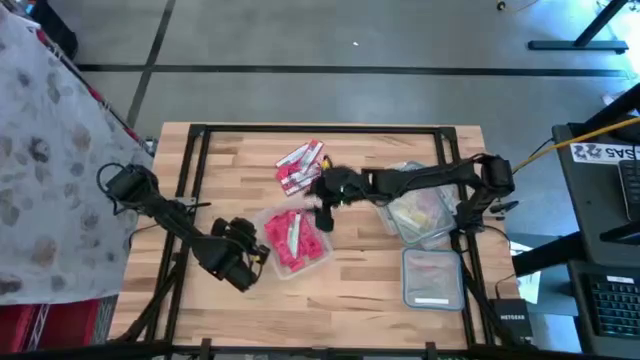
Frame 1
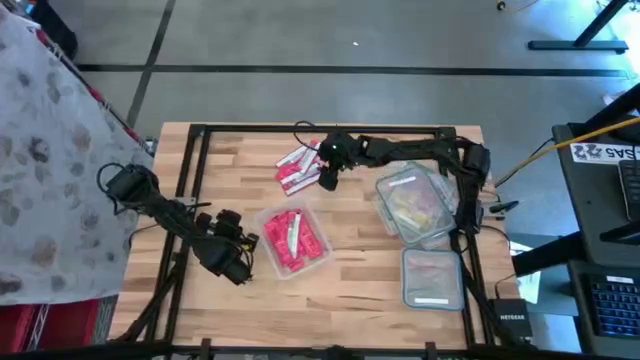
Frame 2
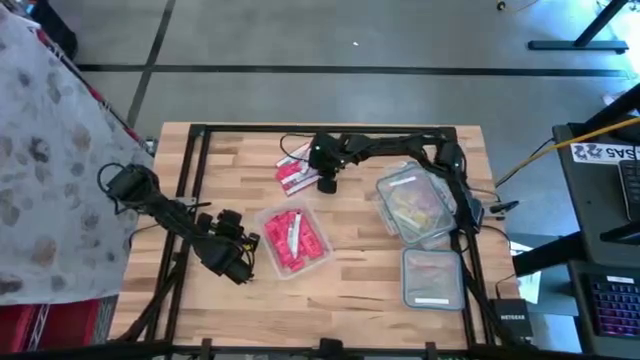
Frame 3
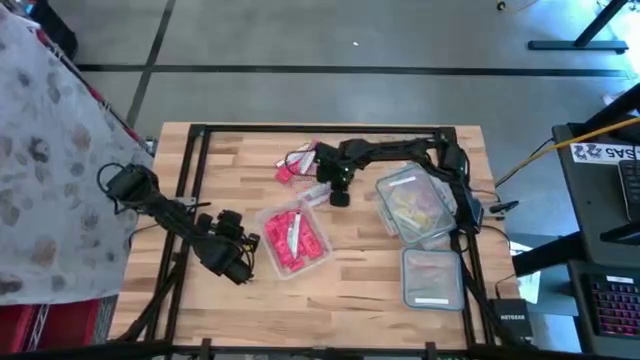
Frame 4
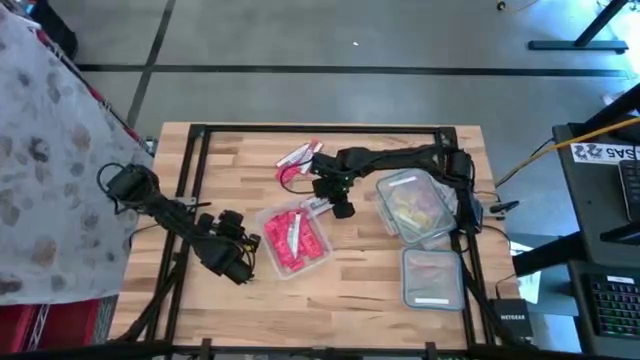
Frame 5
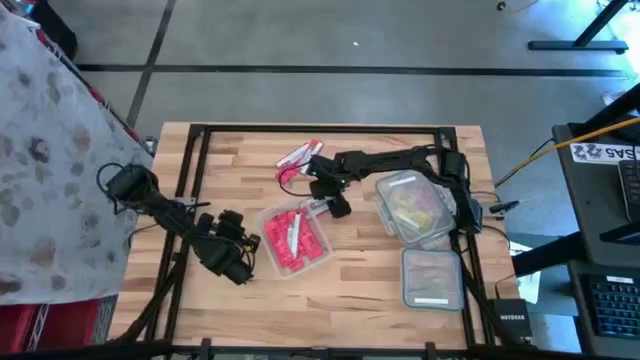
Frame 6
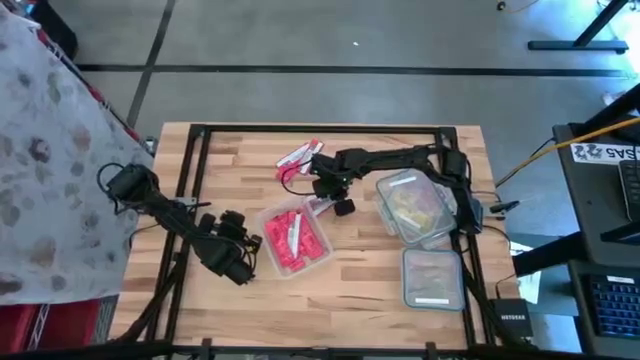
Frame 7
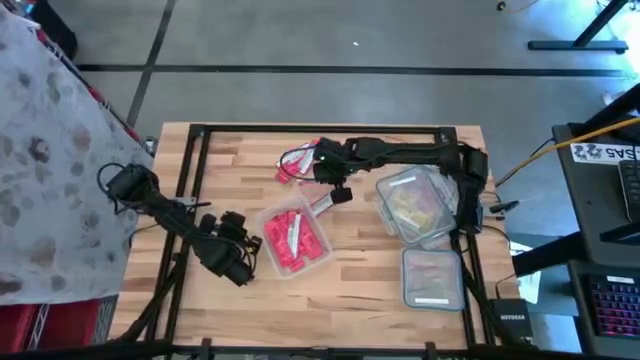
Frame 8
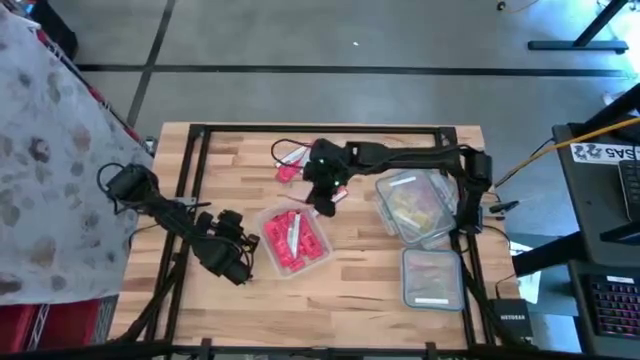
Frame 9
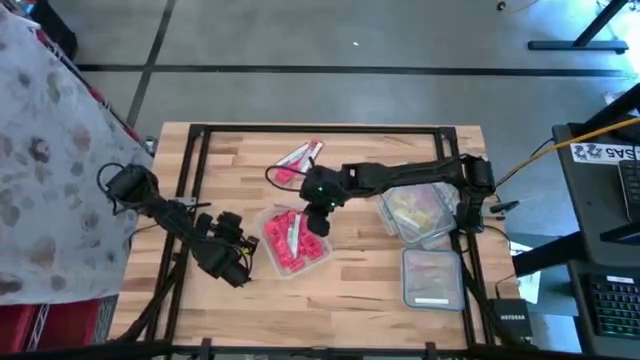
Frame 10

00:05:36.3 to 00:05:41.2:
Task: Sort candy
Put the pink candy strip into the left transparent bin

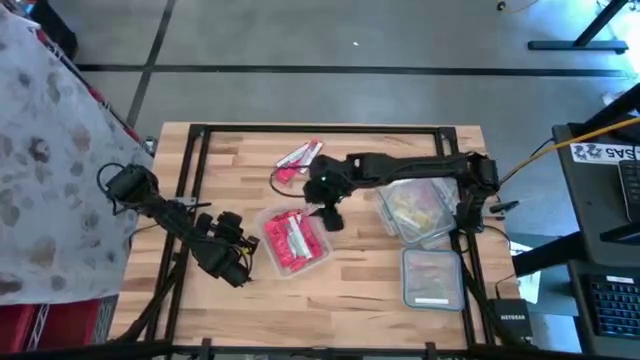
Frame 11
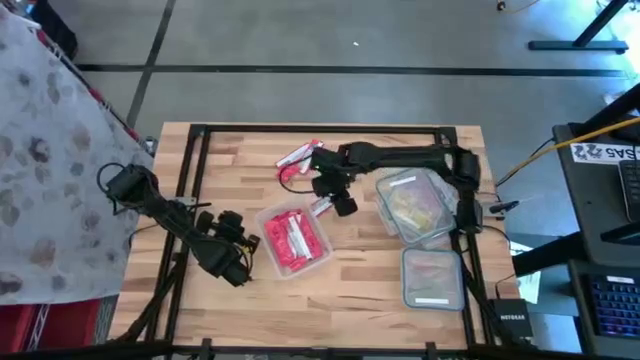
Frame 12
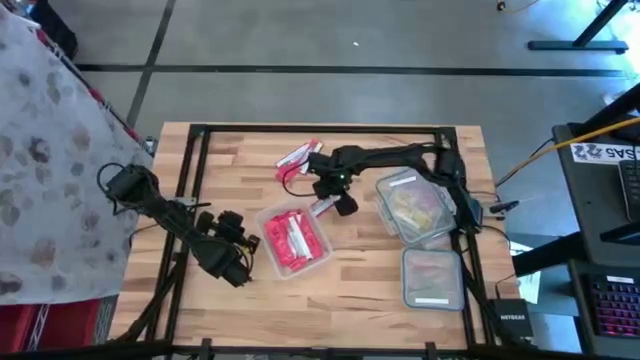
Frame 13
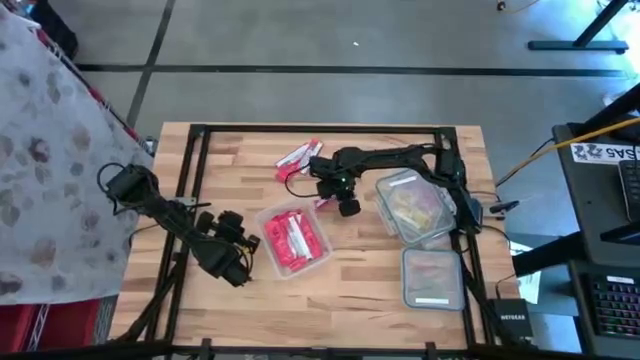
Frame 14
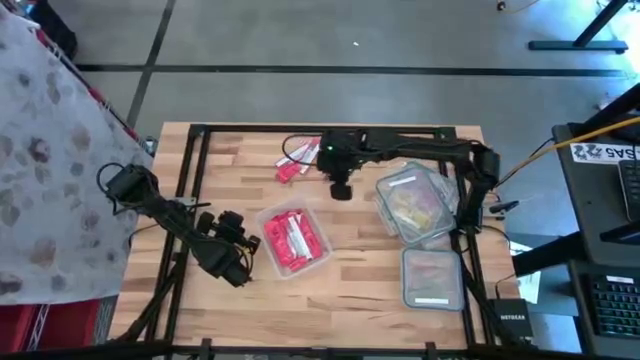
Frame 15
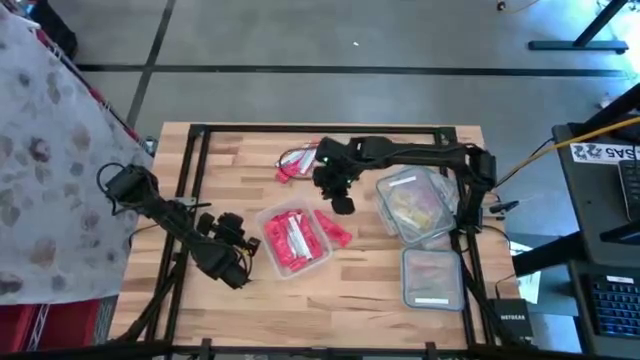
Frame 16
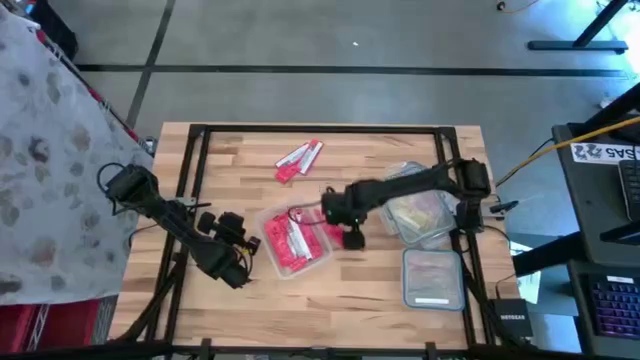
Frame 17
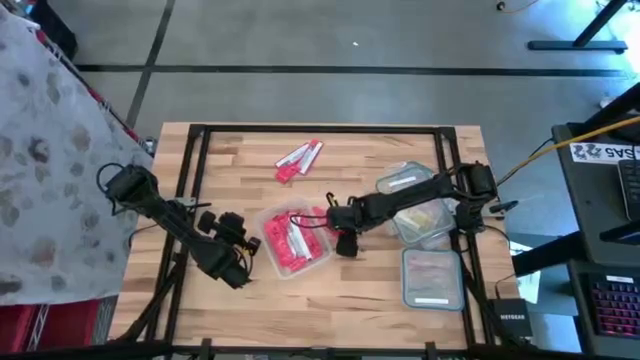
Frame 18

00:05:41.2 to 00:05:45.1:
Put the pink candy strip into the left transparent bin

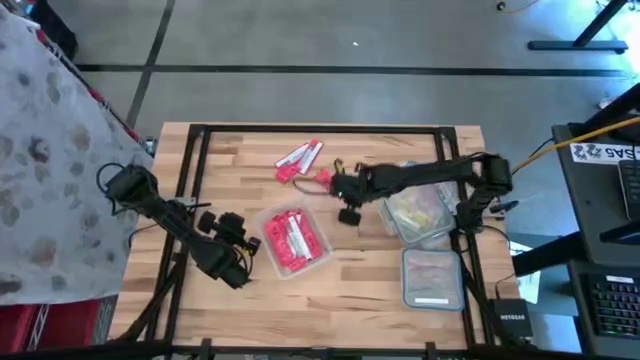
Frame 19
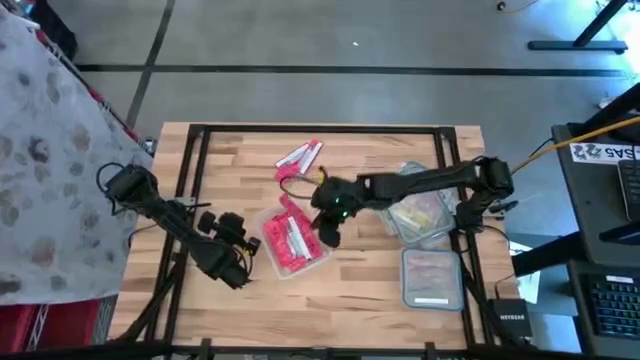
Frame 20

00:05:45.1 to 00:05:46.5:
Put the pink candy strip into the left transparent bin

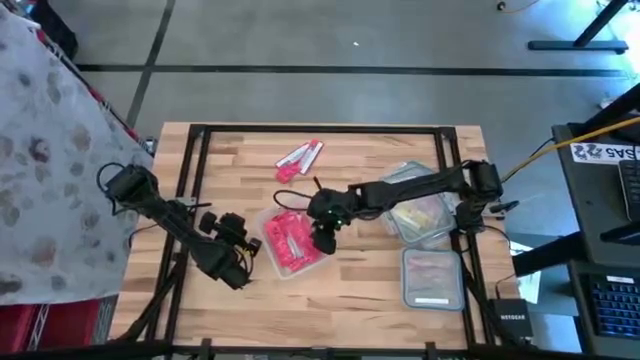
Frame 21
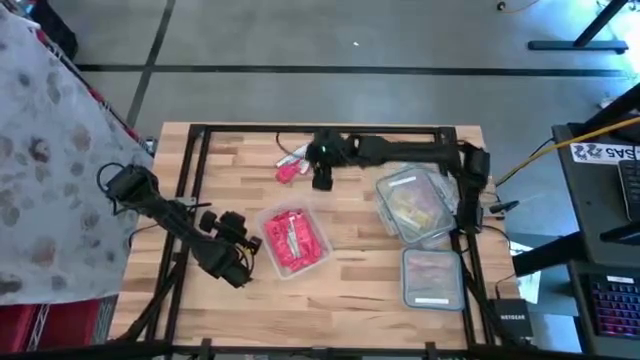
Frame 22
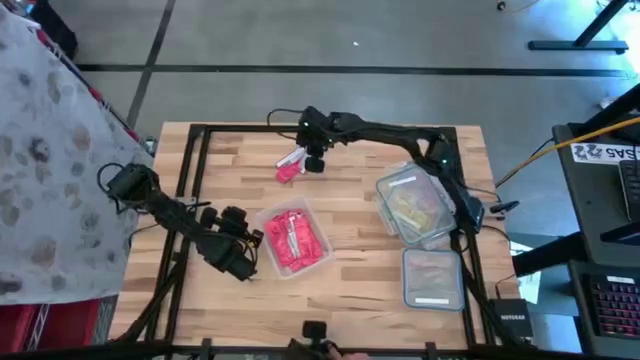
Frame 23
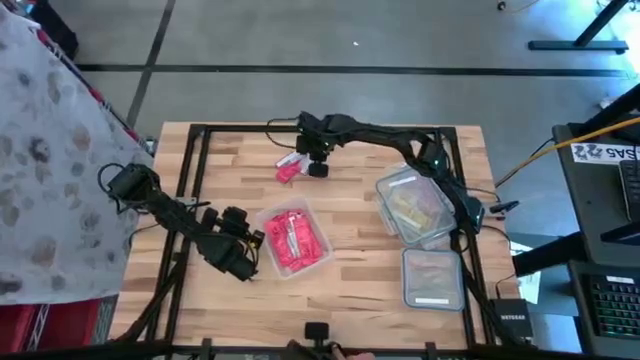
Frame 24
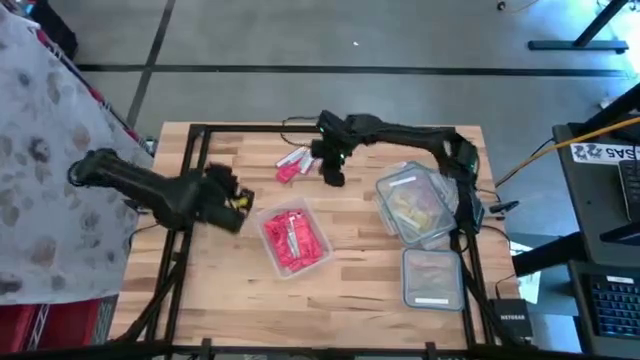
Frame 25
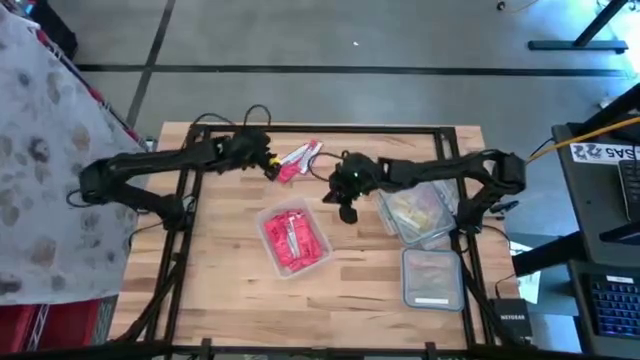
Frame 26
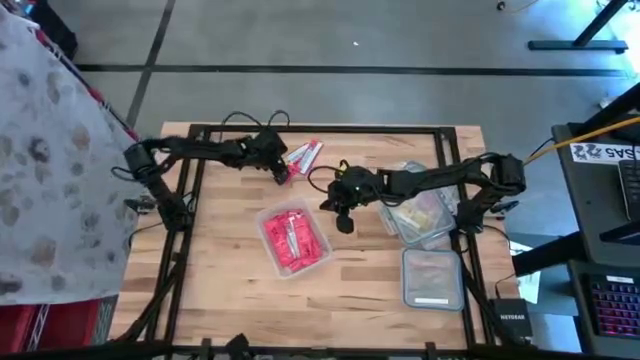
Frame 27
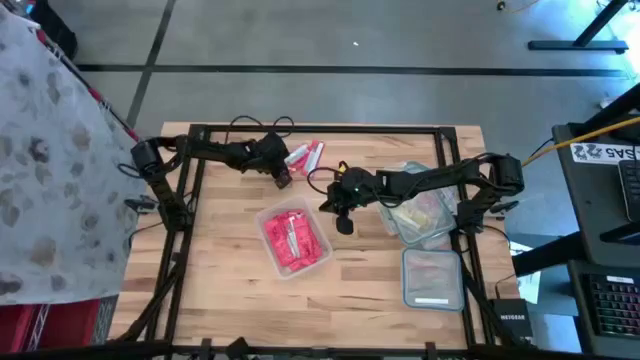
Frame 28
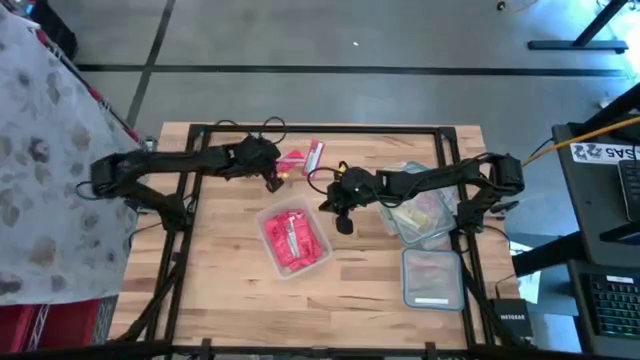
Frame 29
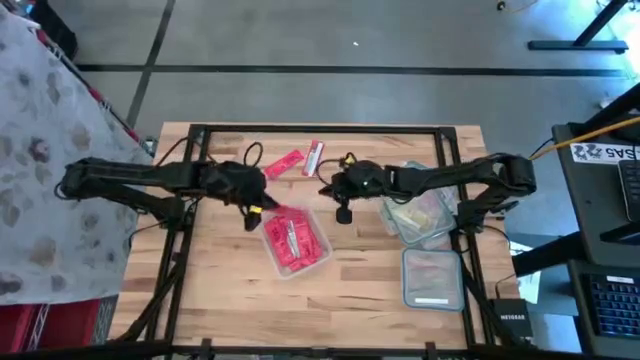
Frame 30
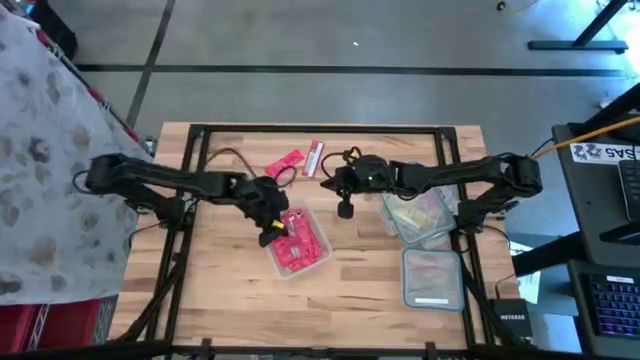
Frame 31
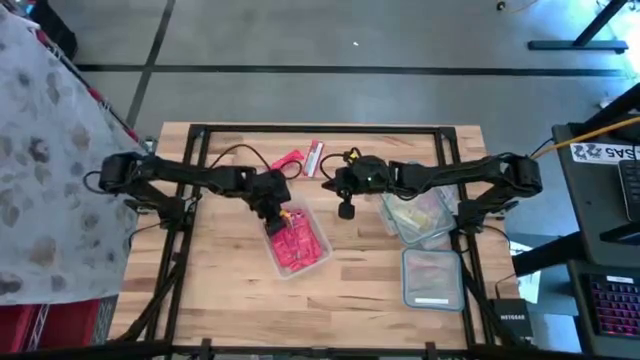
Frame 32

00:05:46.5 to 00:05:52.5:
Put the pink candy strip into the left transparent bin

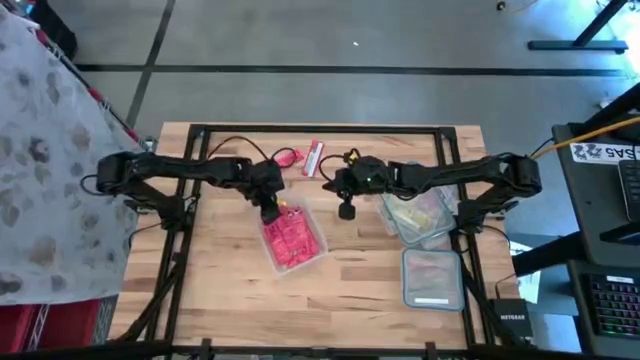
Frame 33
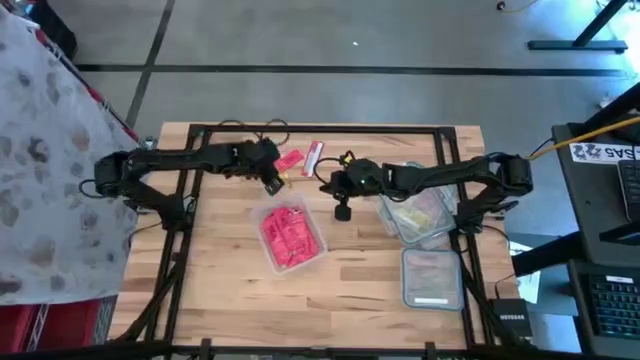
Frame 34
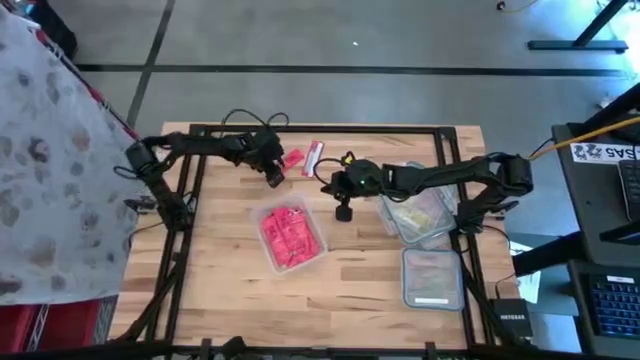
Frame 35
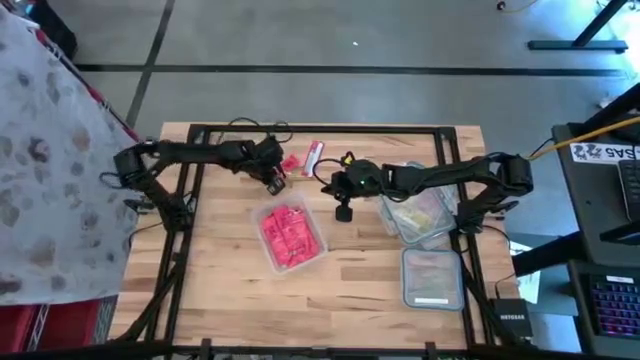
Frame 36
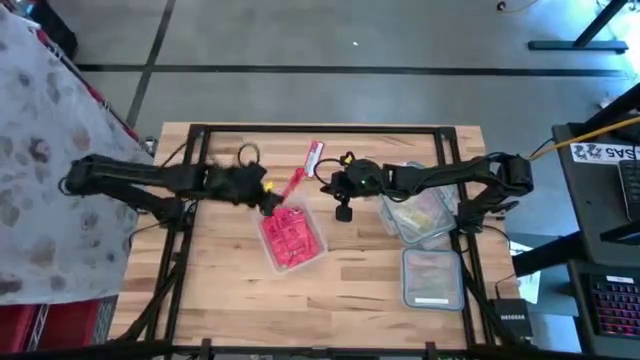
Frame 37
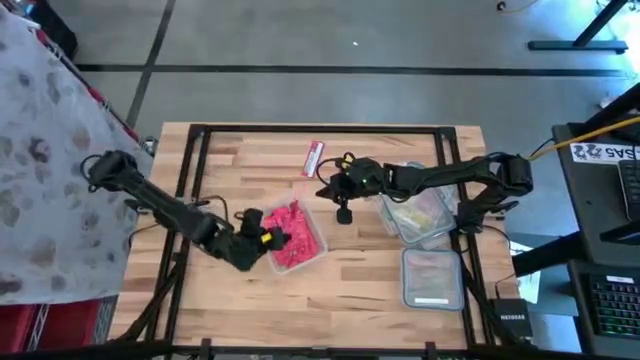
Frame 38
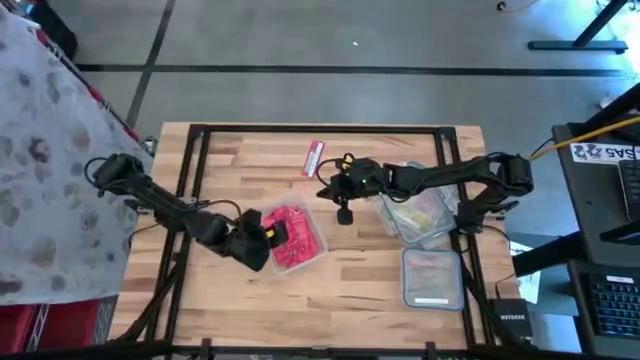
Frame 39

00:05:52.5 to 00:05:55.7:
Put the pink candy strip into the left transparent bin

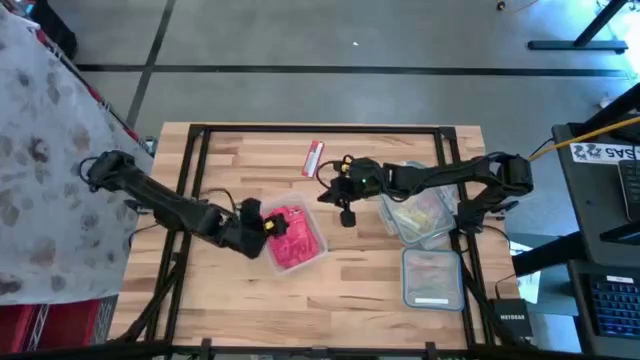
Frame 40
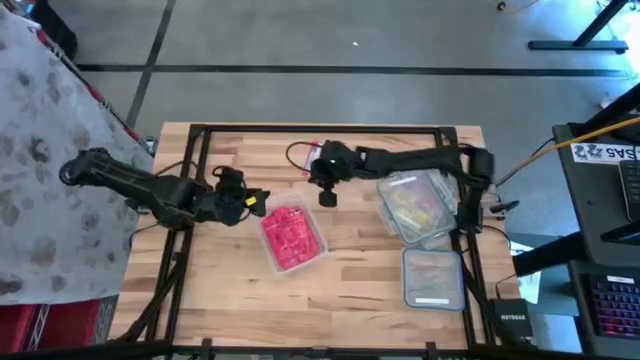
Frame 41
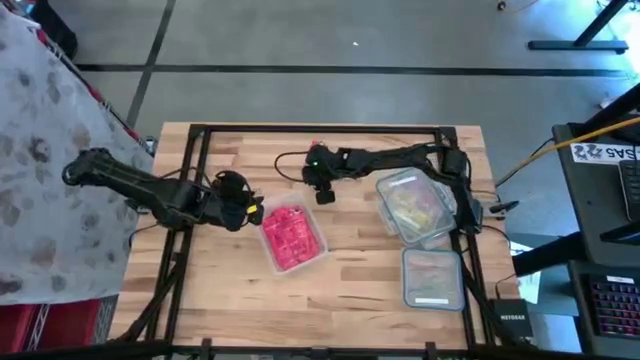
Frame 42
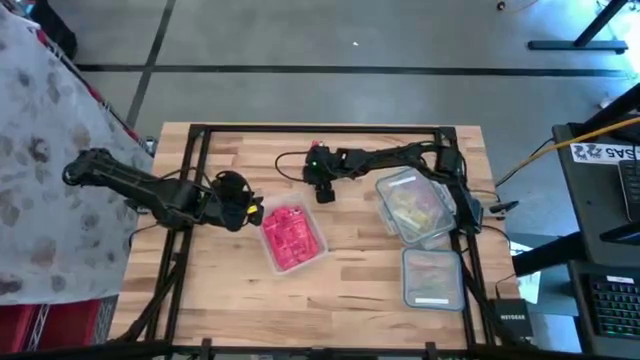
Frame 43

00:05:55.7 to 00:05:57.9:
Put the pink candy strip into the left transparent bin

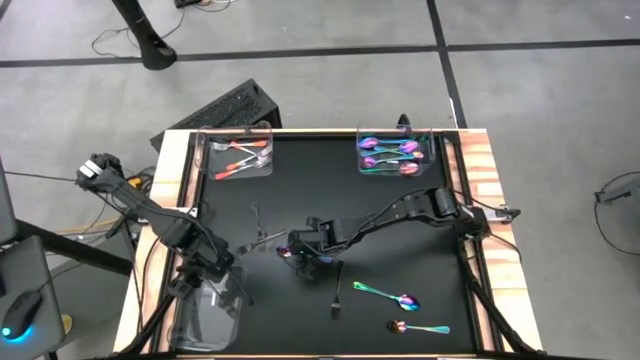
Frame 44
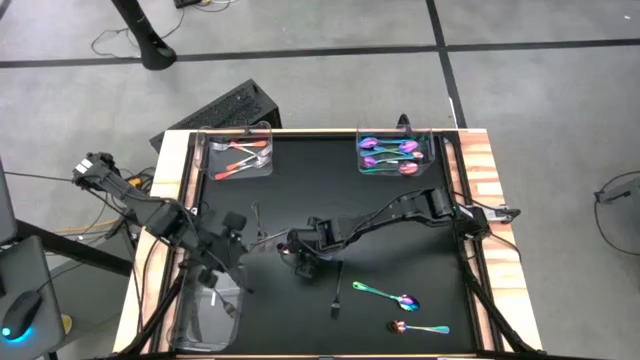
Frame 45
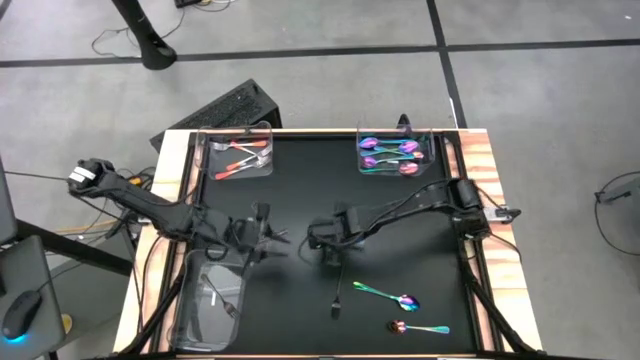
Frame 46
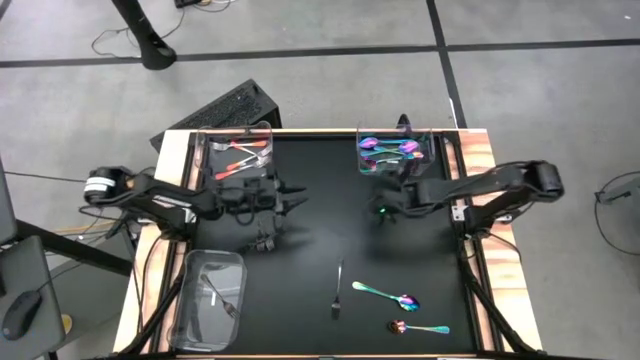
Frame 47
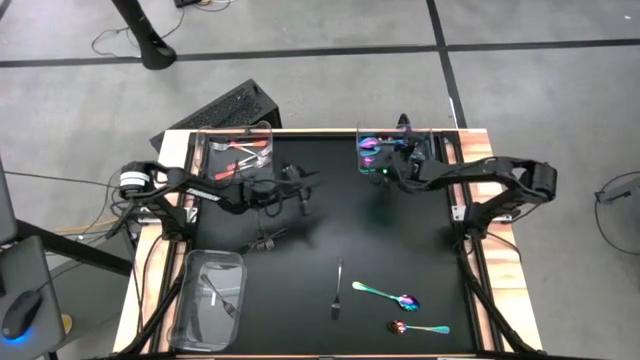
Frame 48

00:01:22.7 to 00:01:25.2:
Task: Sort silverware by color (type)
Put the blue spoon into top right transparent bin
